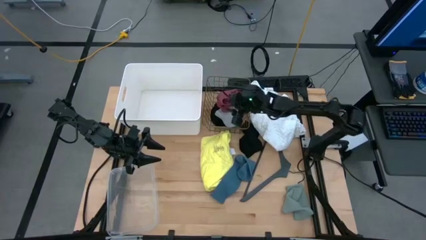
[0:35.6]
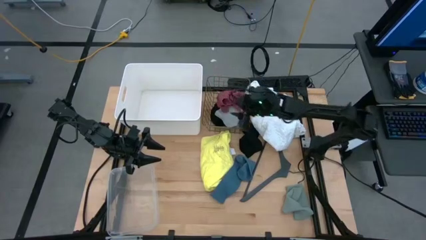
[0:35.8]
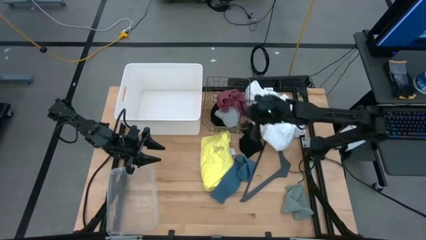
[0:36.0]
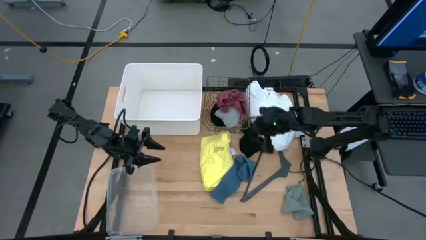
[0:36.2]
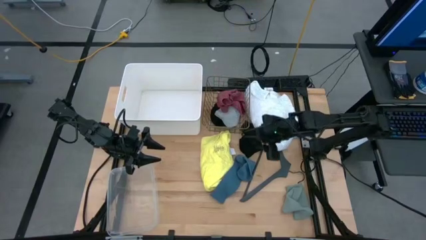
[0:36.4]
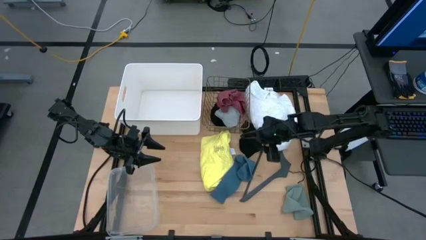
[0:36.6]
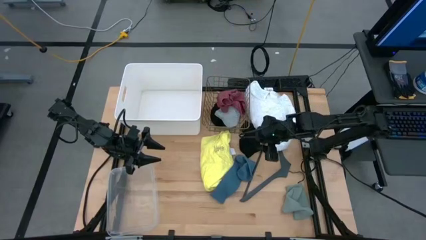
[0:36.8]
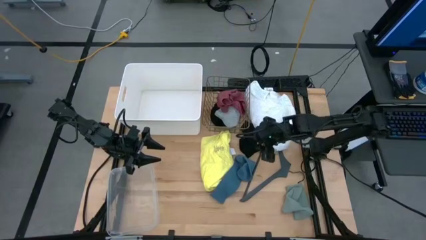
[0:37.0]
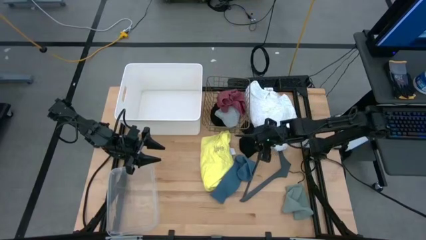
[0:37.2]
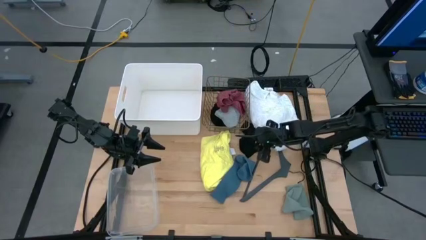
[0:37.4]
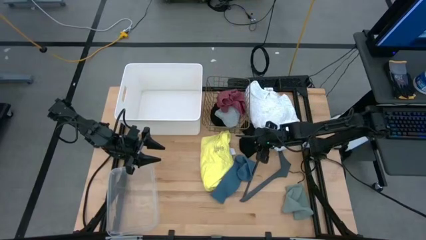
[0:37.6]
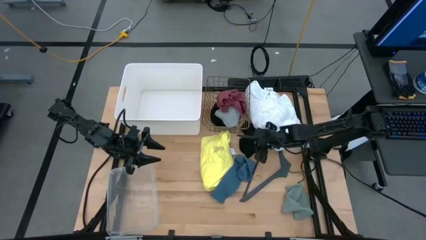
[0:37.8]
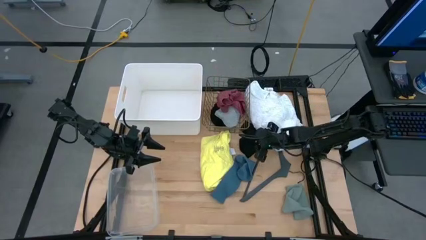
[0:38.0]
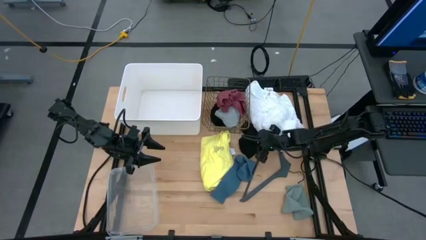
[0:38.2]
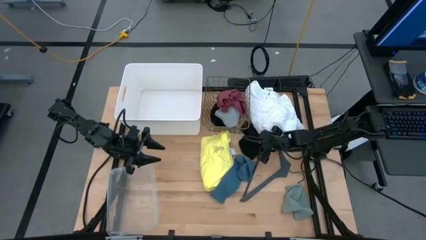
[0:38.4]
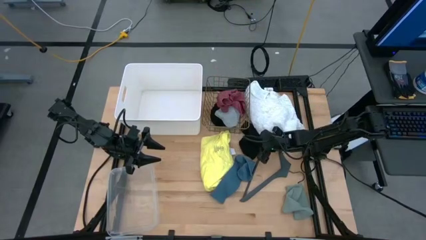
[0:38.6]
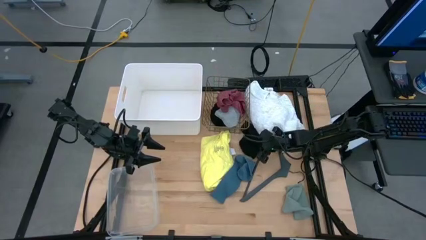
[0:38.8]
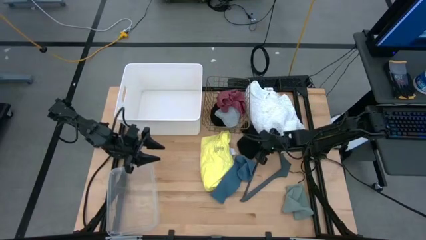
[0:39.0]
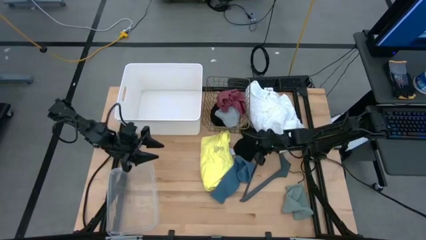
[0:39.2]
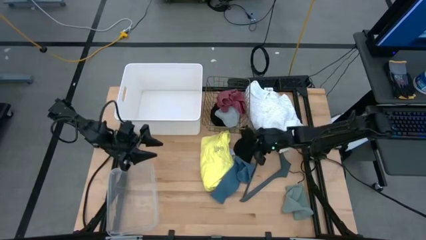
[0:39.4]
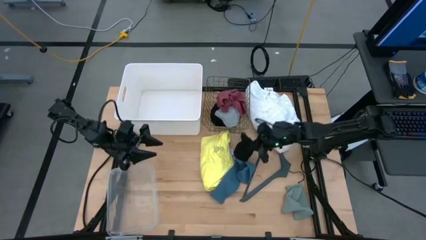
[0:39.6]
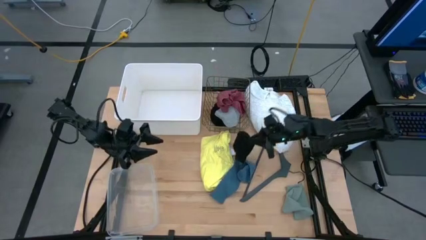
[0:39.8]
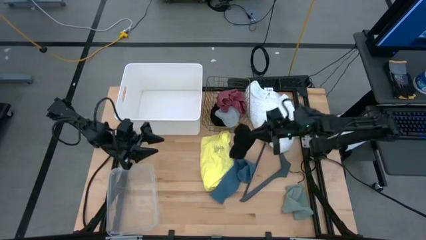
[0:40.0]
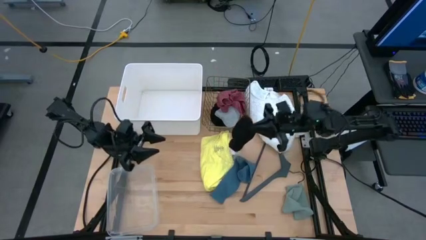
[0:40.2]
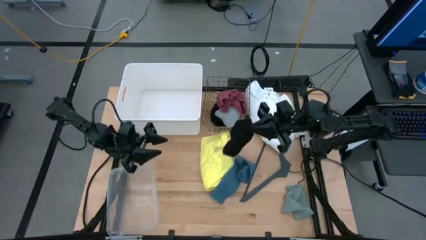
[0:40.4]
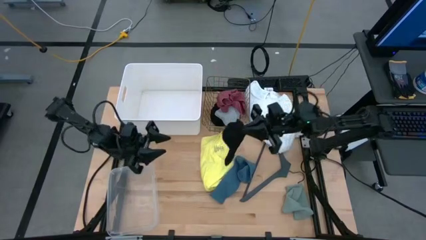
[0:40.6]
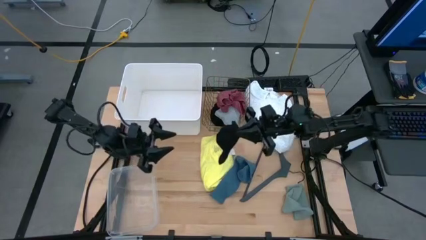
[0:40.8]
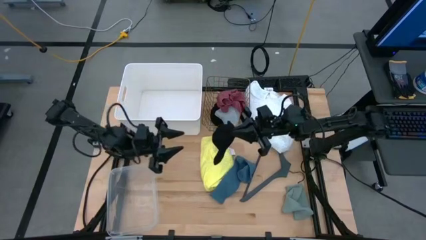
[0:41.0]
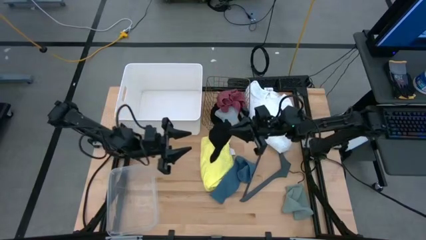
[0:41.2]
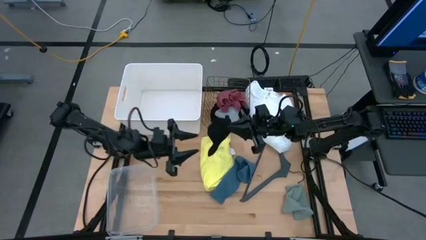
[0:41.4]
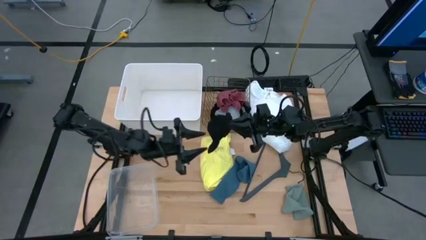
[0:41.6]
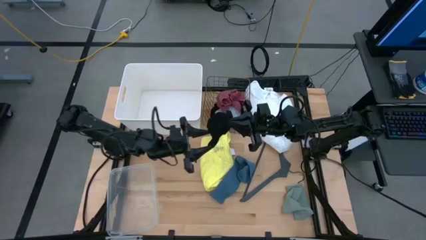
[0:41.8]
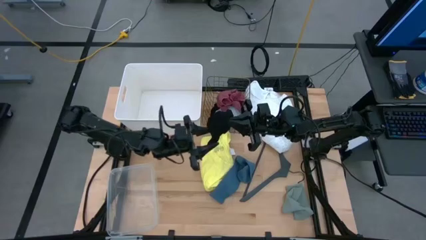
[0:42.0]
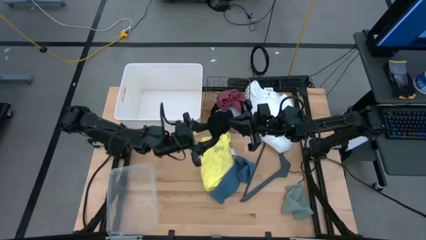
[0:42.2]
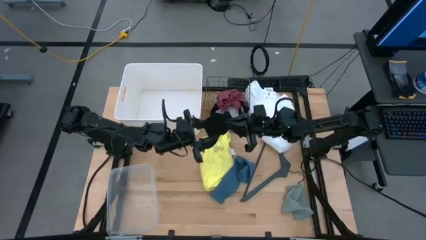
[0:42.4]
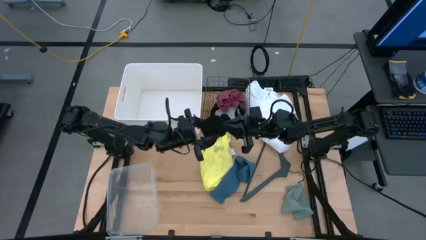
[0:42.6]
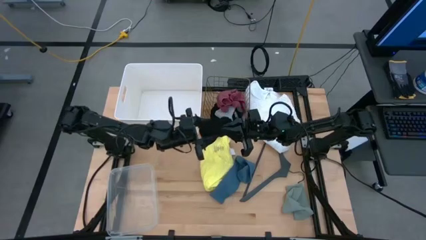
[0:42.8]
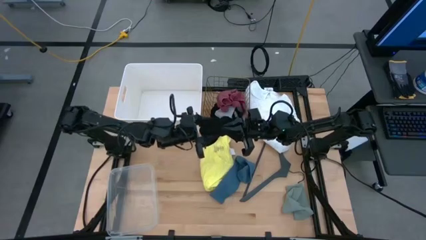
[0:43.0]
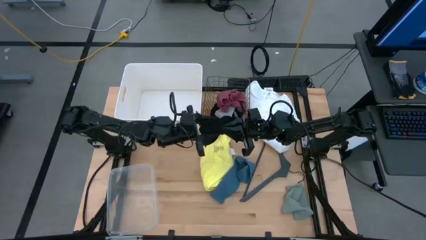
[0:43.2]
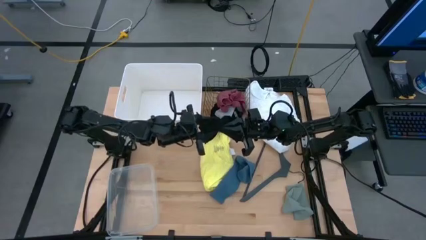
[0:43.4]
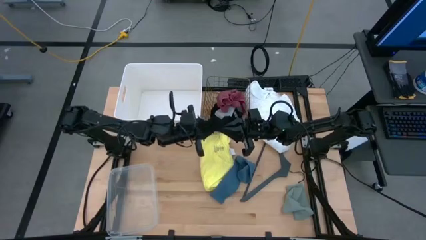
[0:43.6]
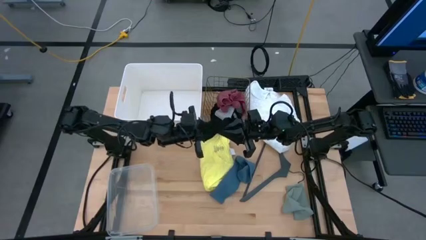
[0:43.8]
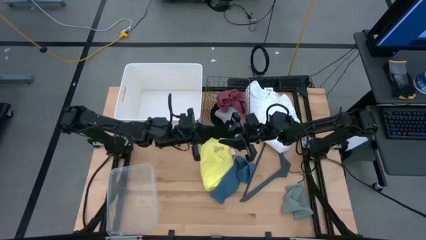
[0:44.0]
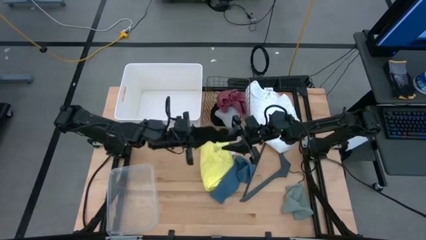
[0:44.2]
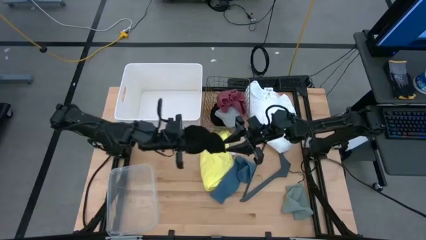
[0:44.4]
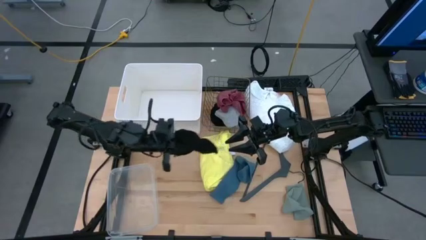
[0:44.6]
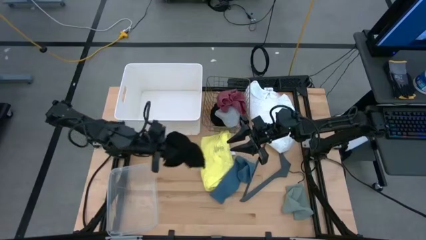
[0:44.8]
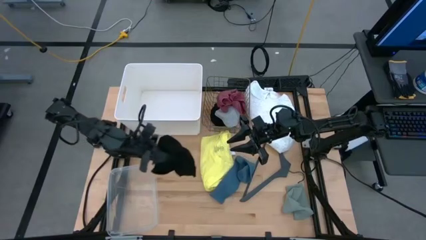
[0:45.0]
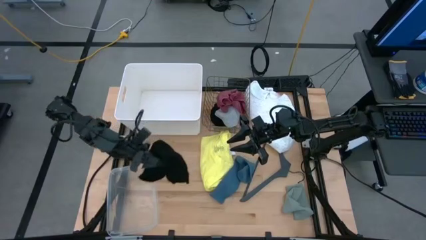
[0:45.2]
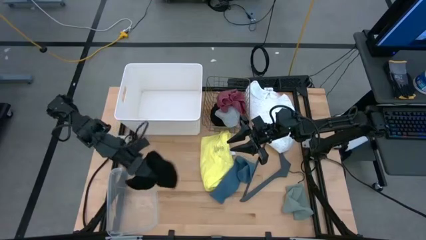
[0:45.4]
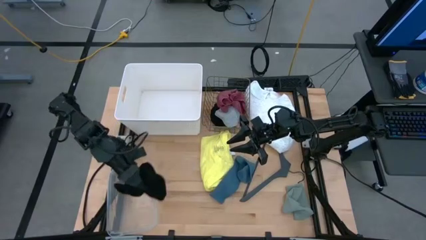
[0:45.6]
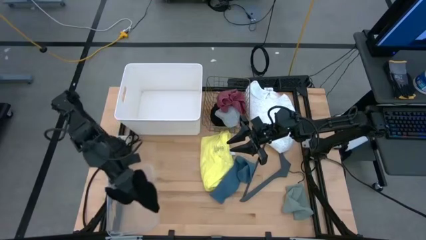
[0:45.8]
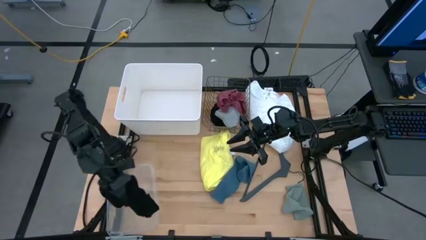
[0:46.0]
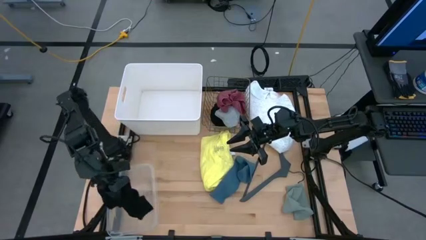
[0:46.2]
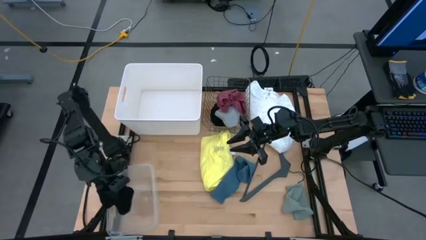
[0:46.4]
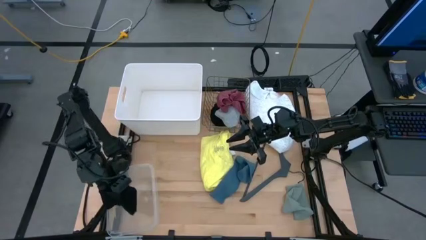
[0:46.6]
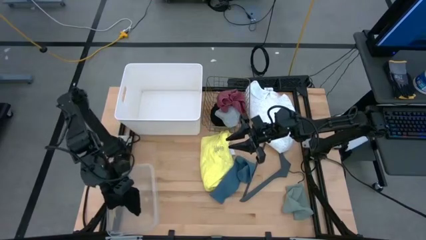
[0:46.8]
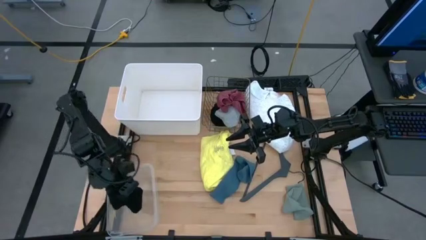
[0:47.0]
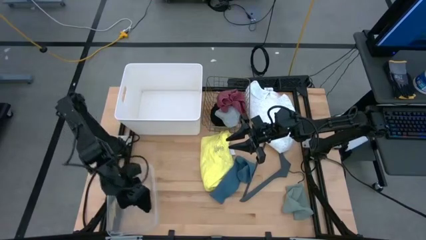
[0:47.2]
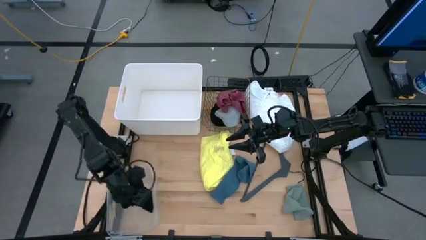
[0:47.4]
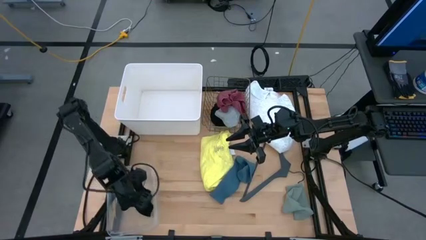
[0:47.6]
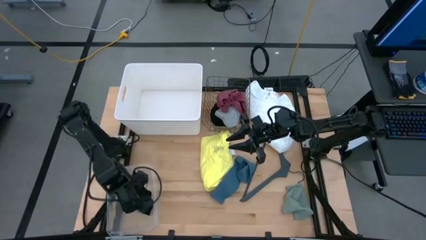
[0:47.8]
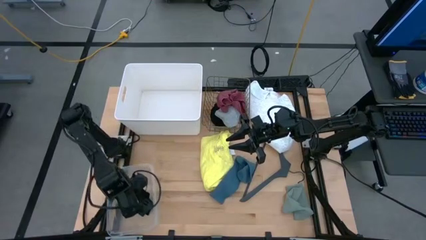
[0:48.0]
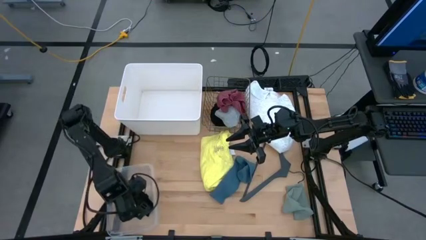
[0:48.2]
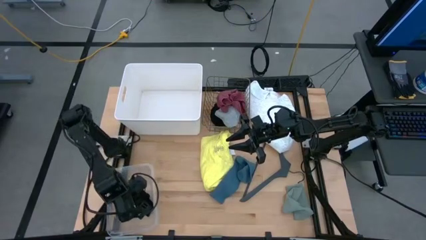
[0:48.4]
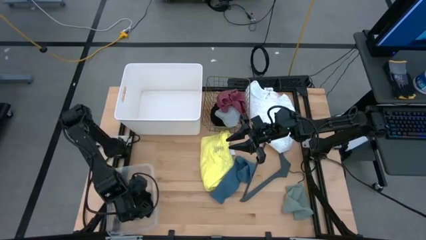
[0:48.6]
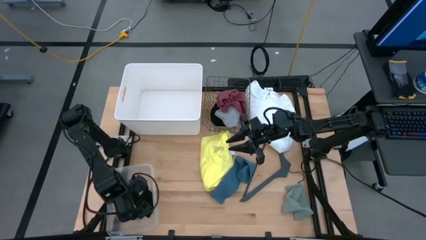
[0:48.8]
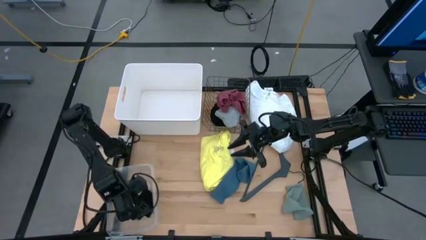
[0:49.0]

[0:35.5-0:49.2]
Task: Pick & Place Cloths
Put the black sock into the transparent bin

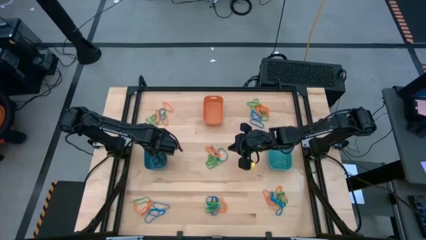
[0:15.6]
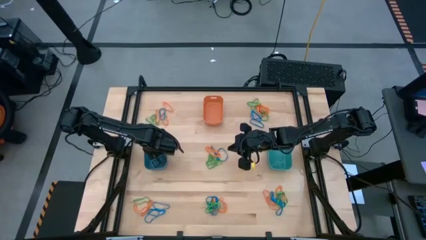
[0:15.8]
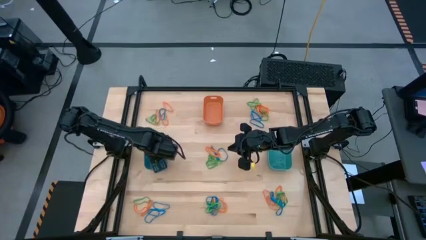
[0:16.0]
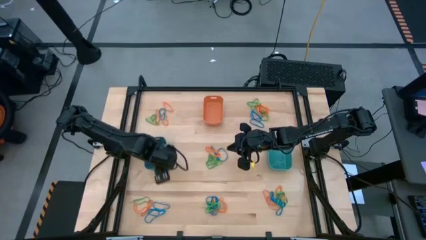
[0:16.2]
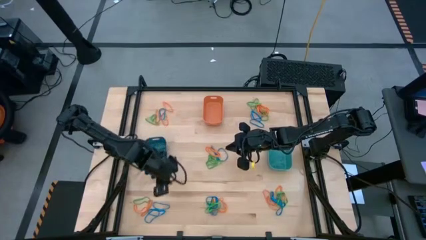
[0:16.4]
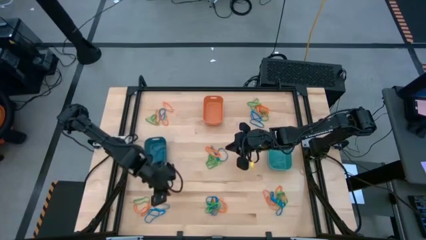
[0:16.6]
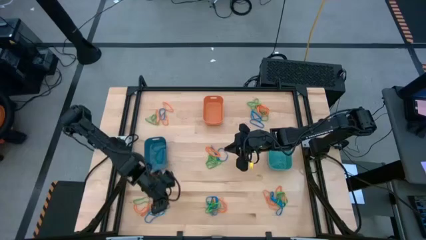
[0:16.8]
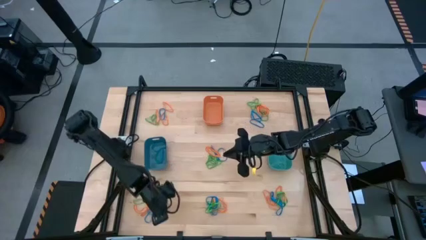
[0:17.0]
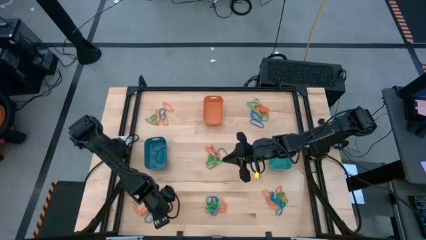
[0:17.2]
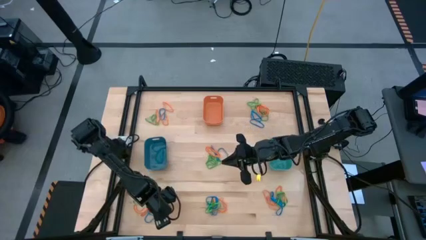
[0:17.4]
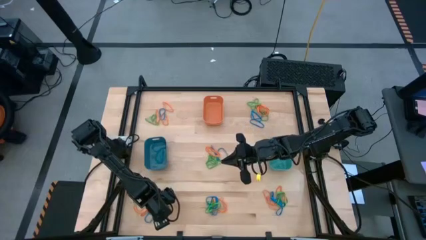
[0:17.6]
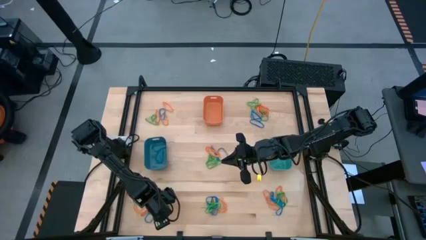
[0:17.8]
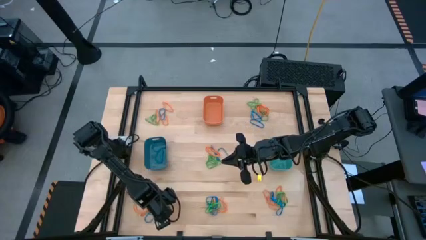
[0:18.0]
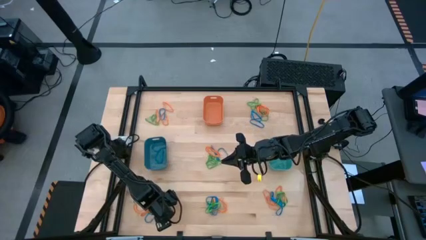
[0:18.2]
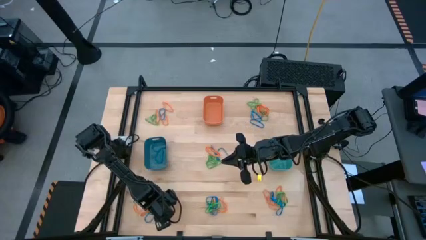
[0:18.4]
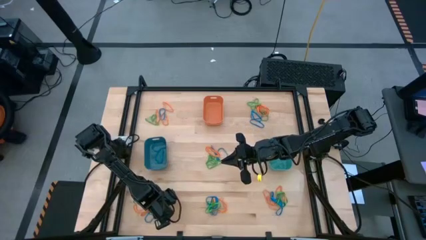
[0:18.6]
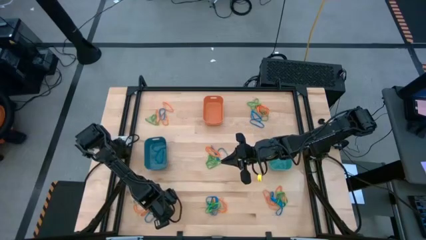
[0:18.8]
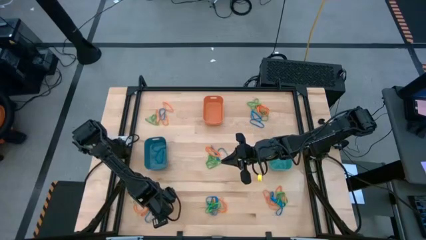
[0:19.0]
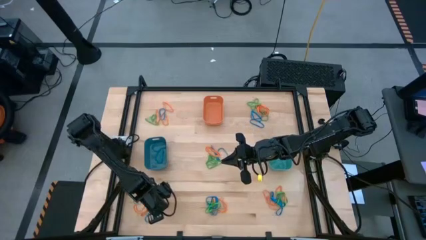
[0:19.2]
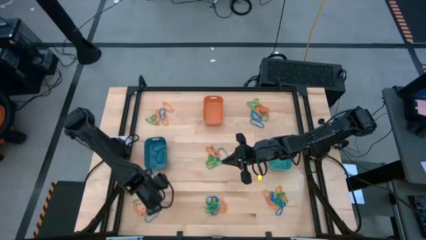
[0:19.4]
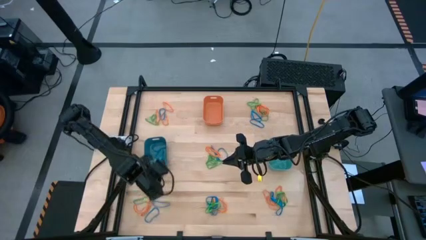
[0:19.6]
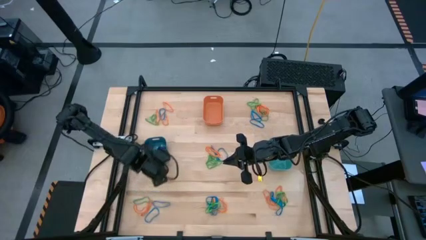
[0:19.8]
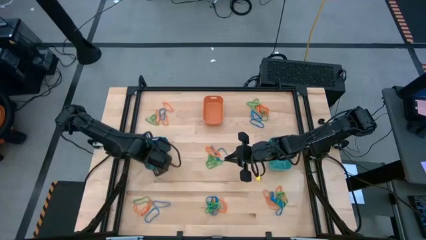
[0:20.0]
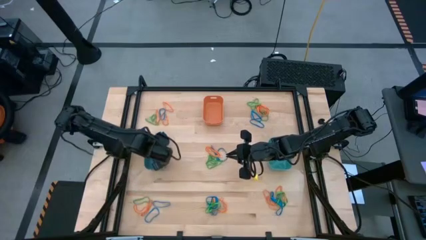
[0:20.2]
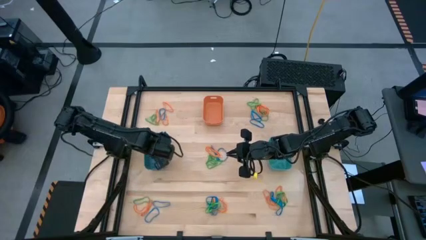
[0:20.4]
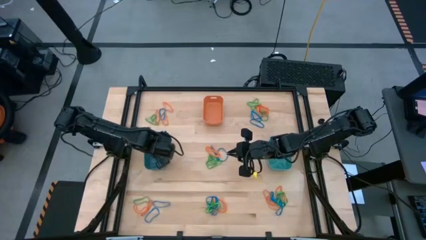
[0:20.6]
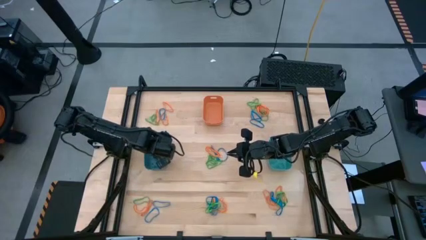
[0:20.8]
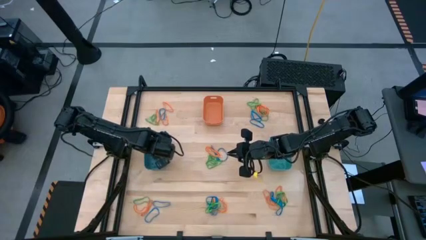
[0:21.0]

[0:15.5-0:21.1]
Task: Sort rubber bands into baskets
Put the blue rubber band into the blue bin
